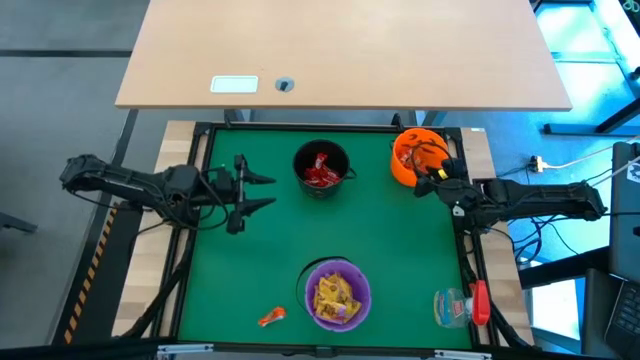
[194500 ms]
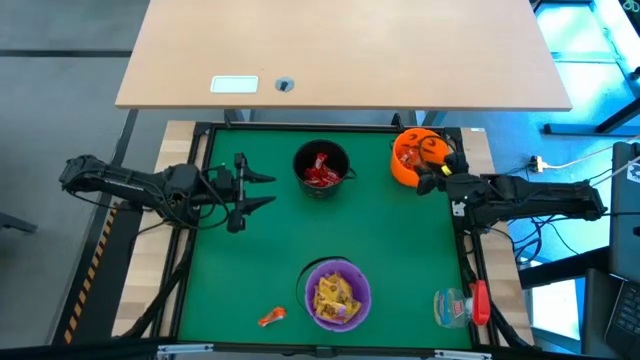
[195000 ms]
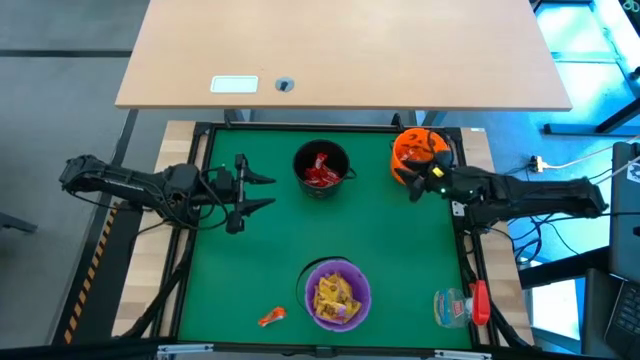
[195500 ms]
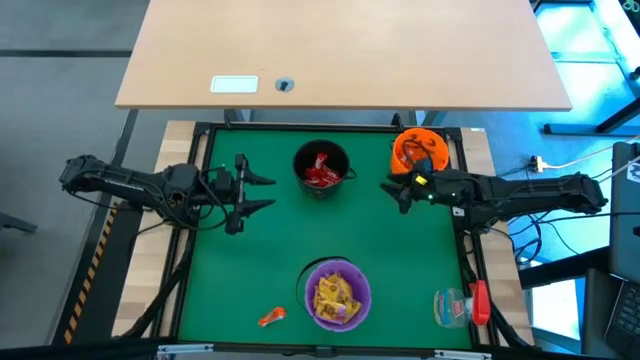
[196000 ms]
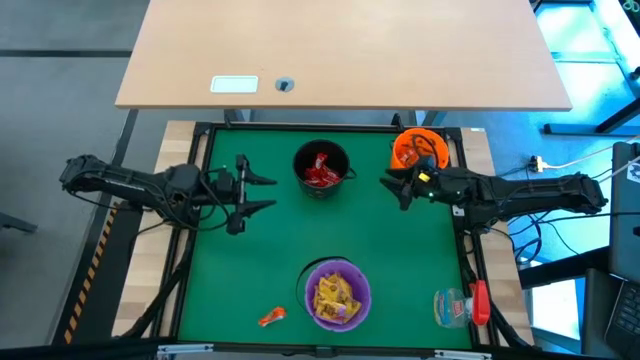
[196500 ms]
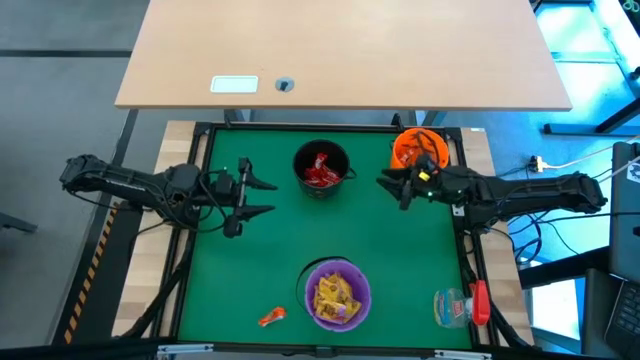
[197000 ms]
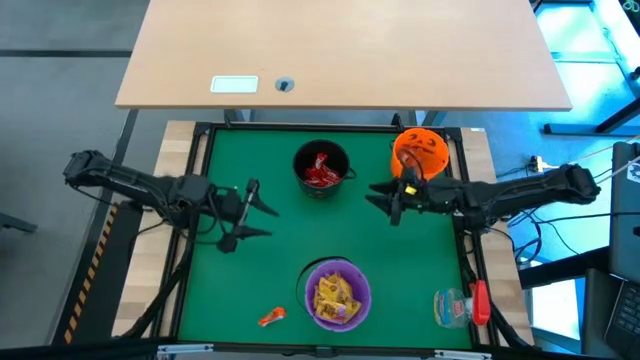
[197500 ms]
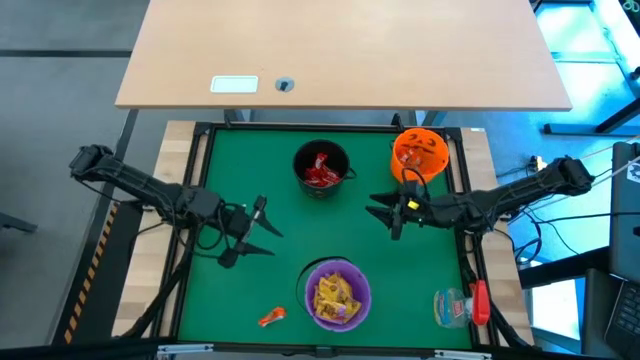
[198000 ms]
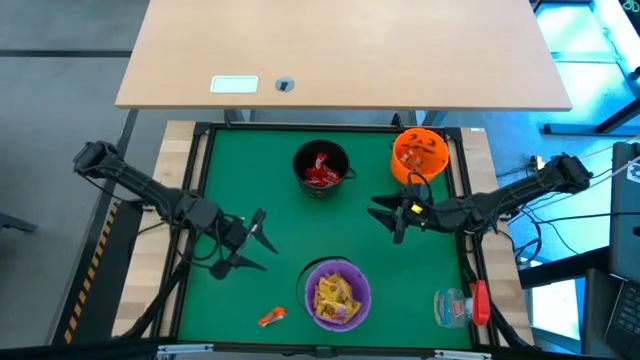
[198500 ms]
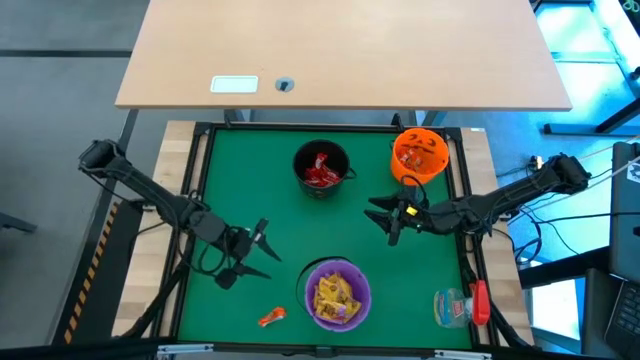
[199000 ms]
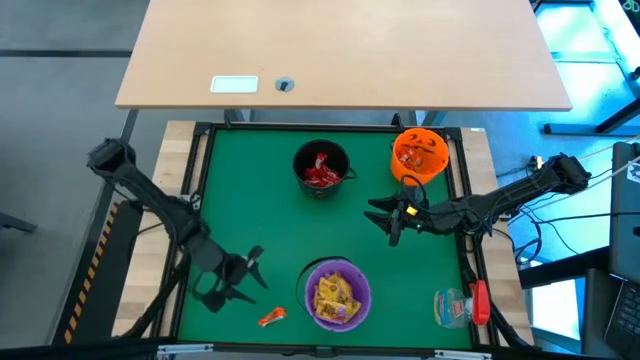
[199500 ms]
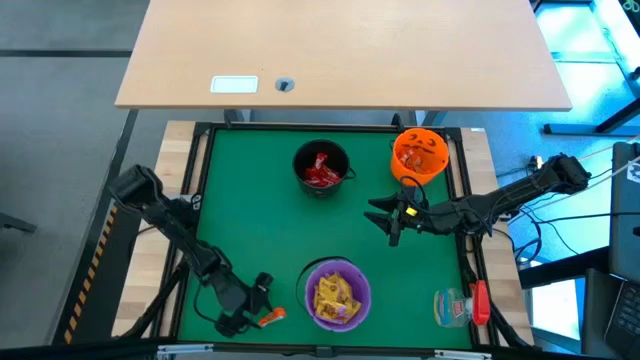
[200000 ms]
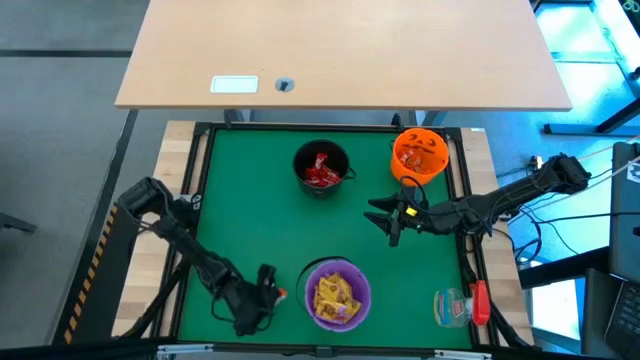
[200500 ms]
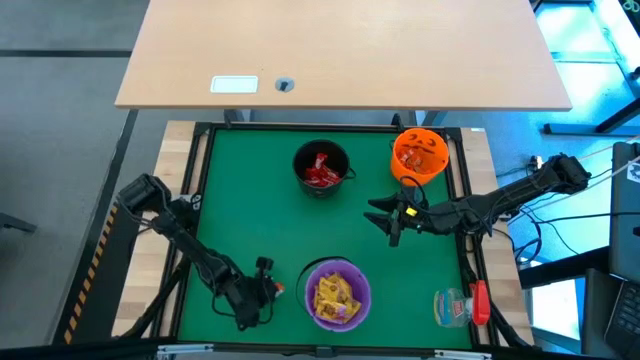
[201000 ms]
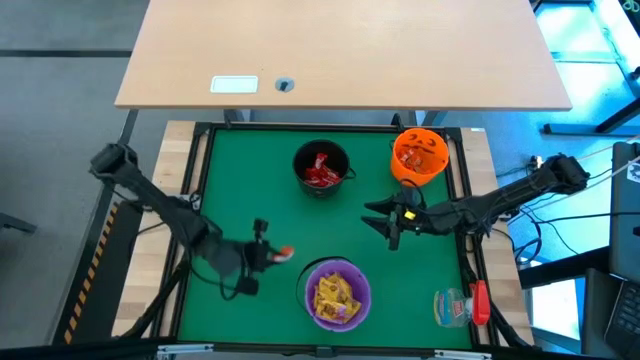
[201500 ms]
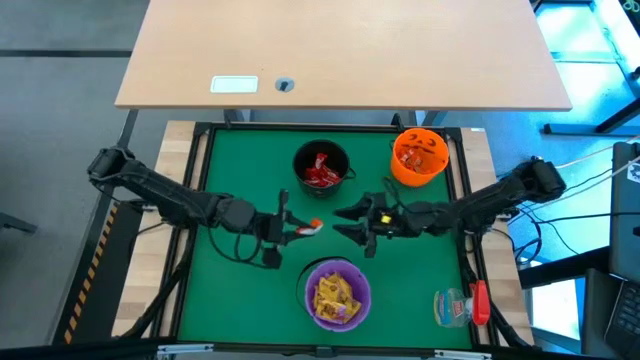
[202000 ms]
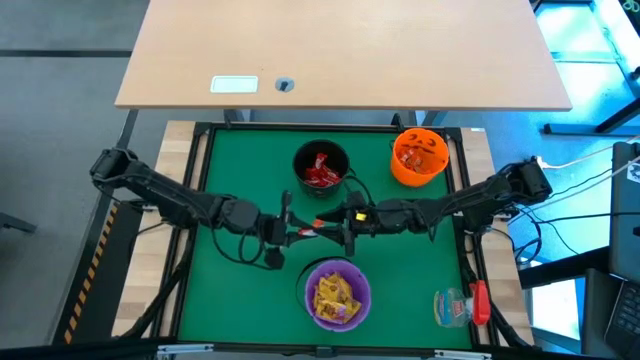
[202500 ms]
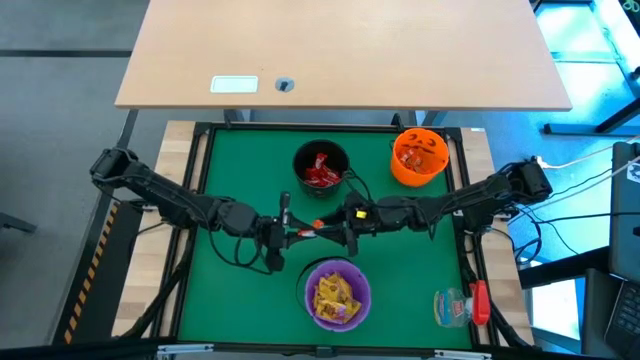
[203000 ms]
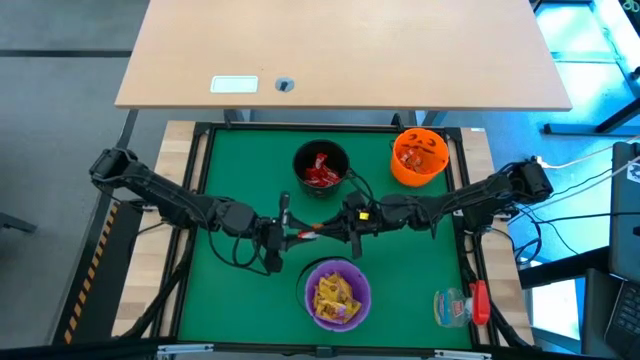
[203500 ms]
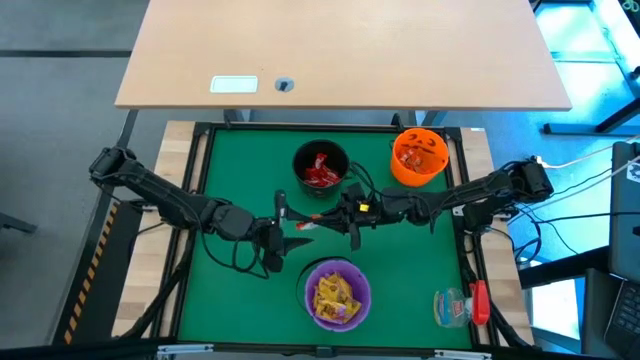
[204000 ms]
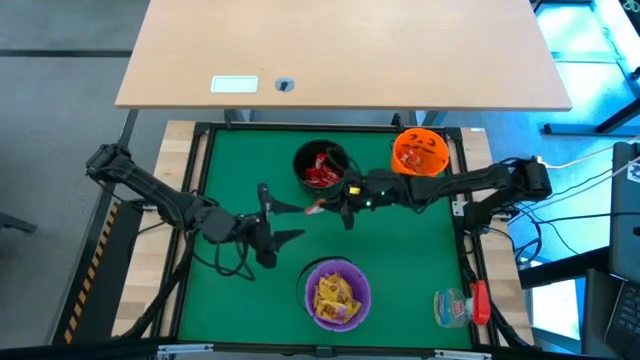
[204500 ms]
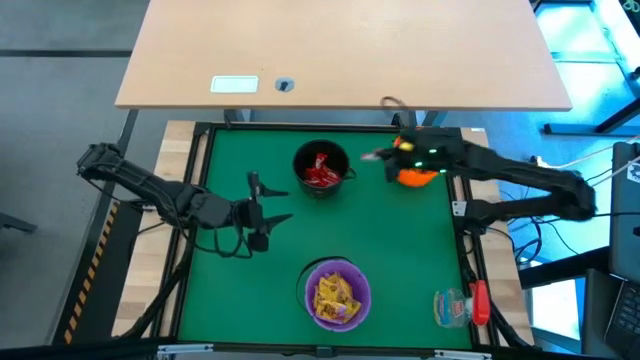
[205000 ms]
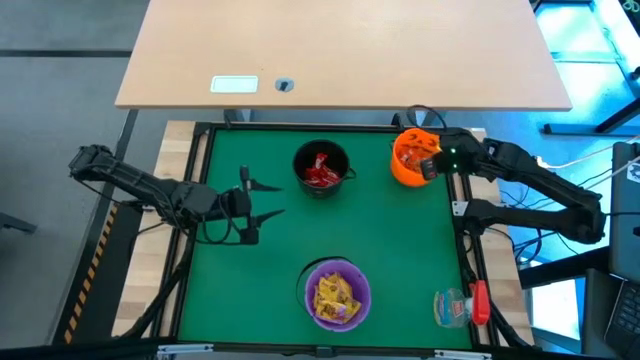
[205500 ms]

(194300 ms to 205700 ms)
Task: Sort candy
Put the orange candy into the orange bucket

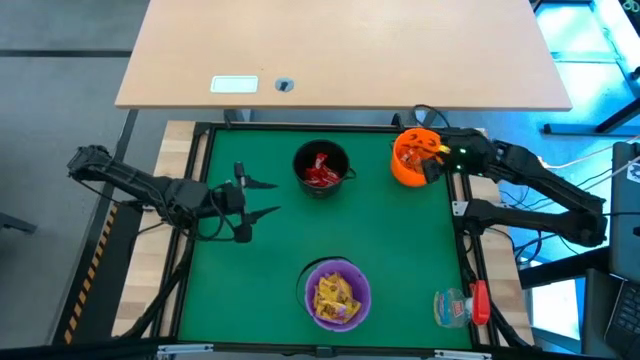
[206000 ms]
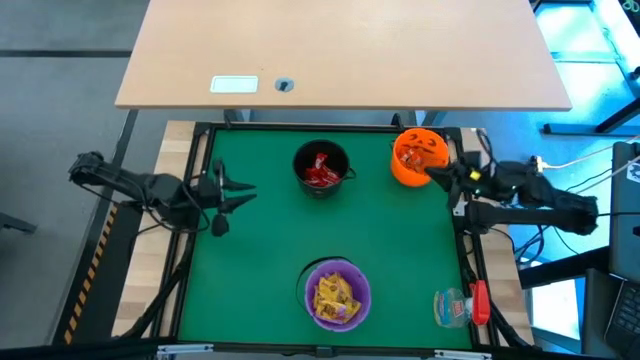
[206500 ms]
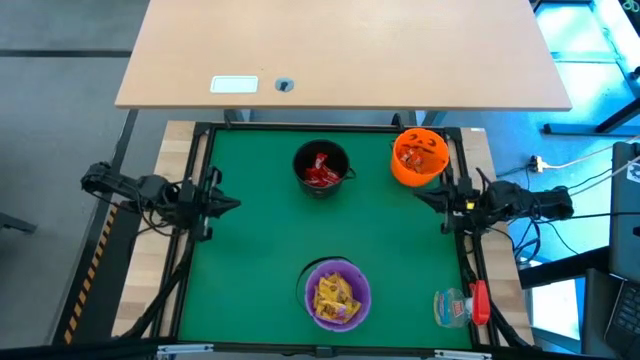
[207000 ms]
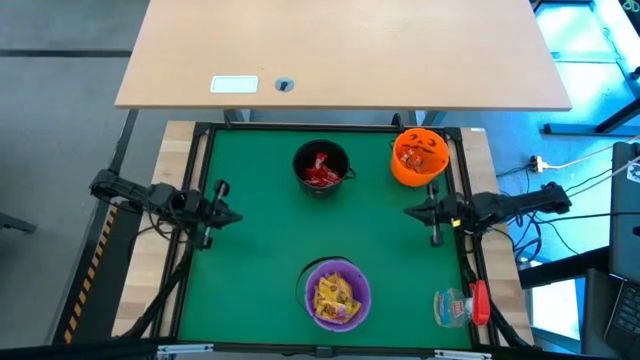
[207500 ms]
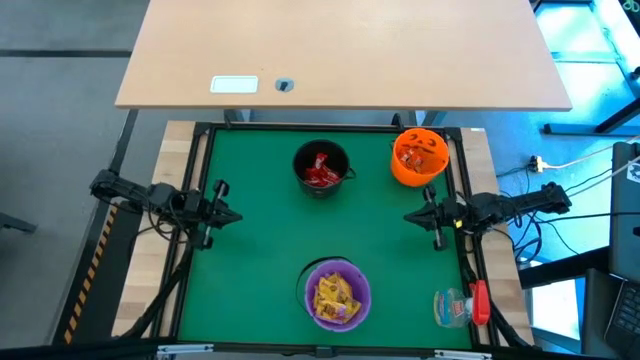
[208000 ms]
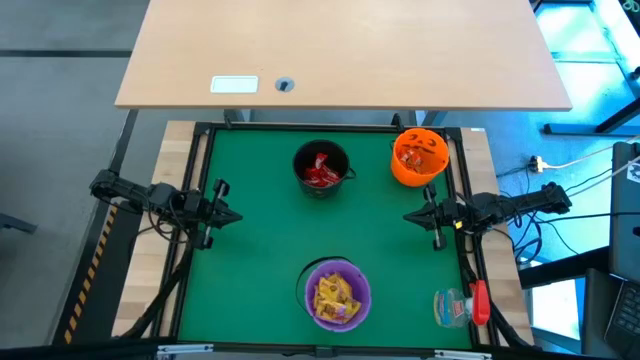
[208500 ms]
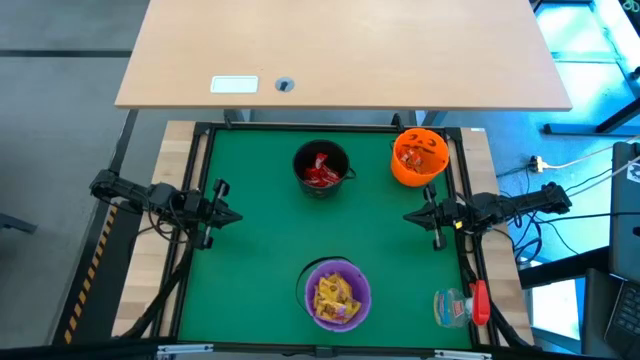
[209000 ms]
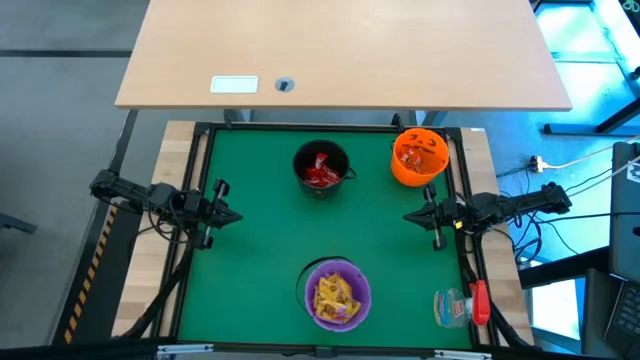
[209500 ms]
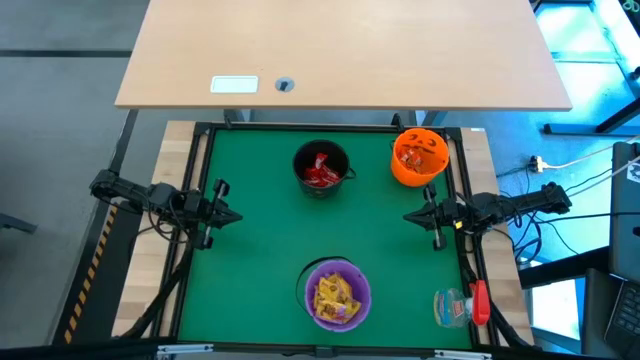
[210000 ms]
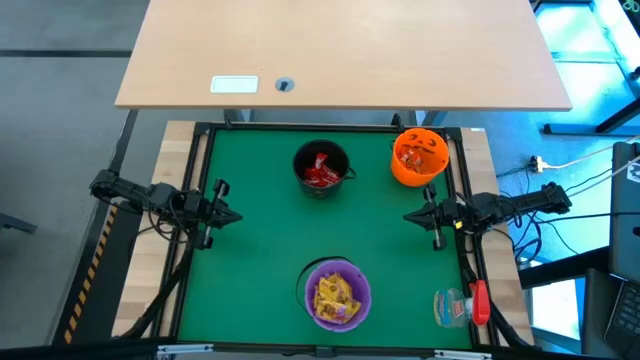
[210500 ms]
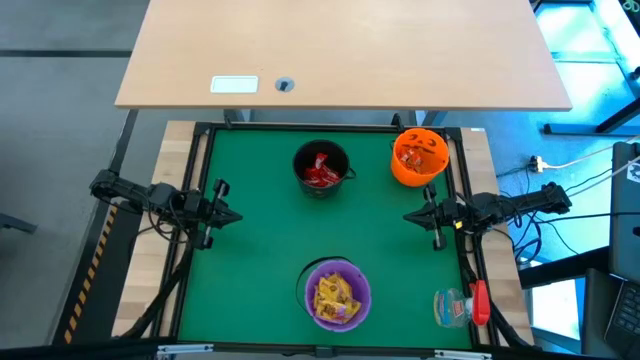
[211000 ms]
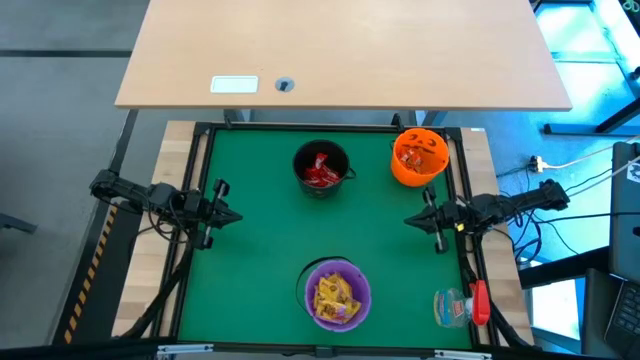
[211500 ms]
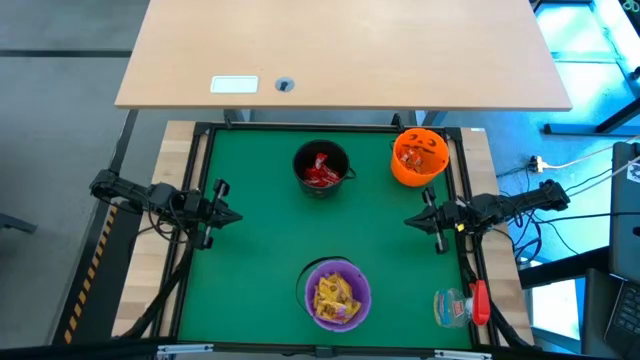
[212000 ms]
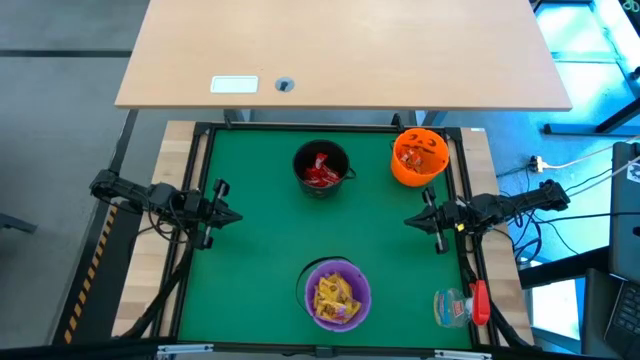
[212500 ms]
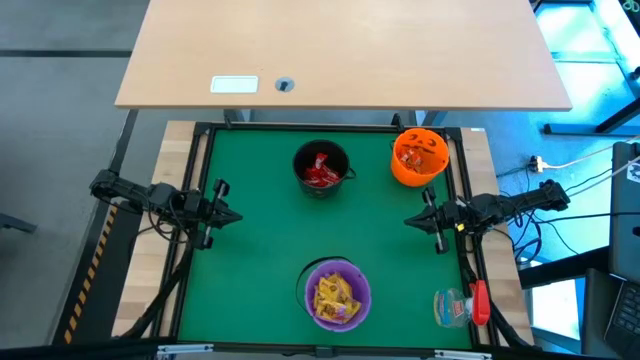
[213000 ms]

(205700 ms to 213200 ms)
Return to Home Position

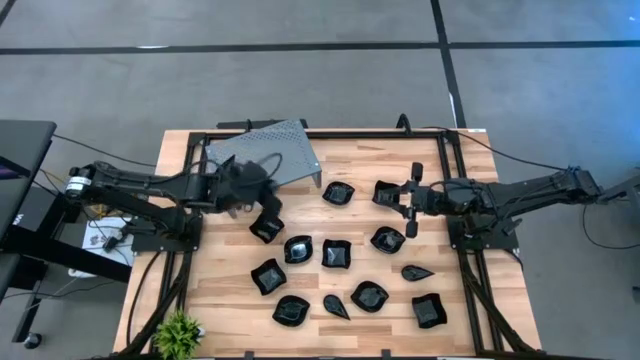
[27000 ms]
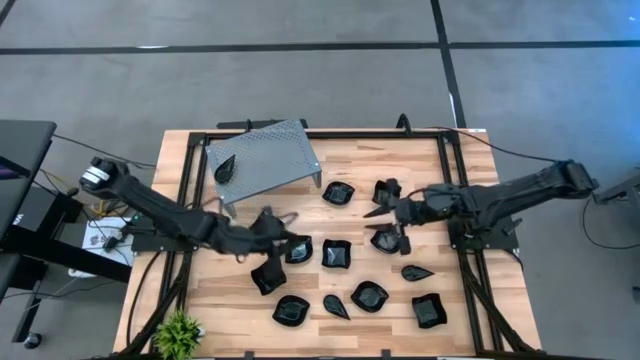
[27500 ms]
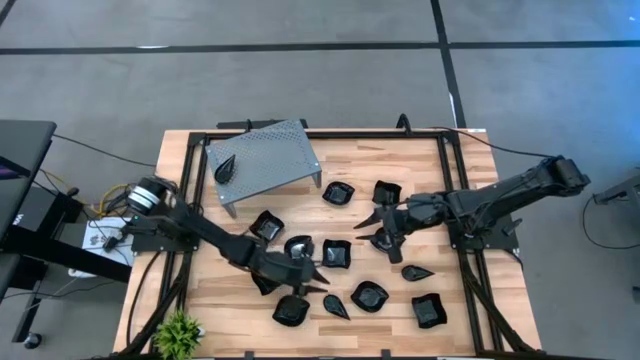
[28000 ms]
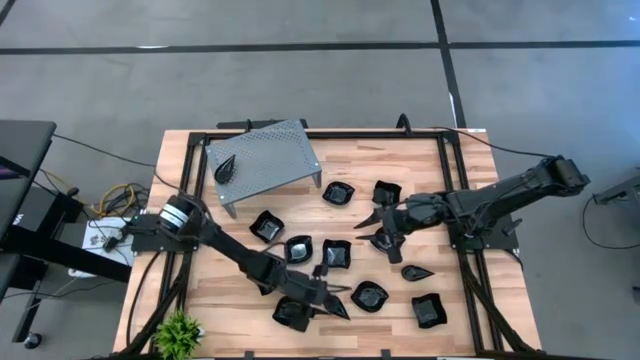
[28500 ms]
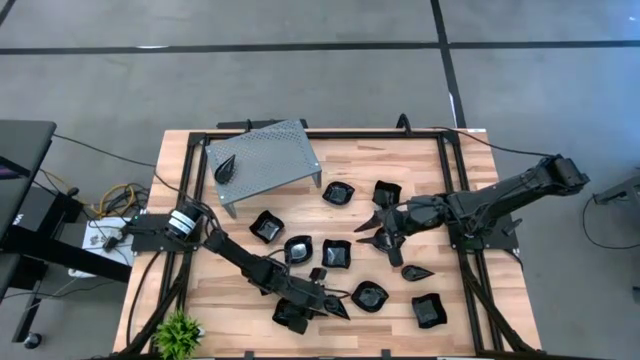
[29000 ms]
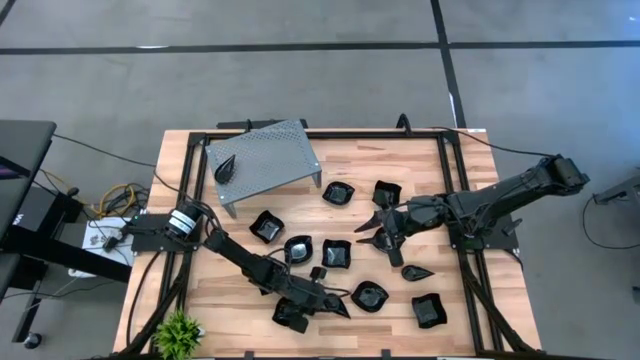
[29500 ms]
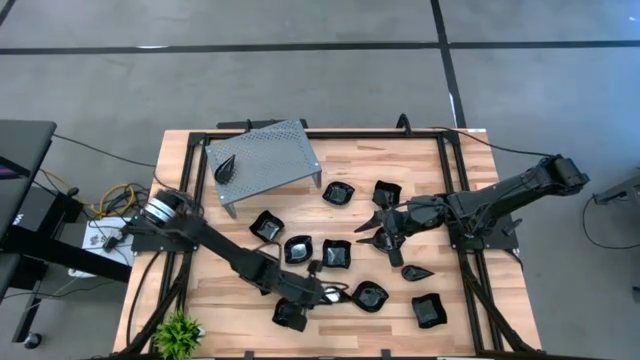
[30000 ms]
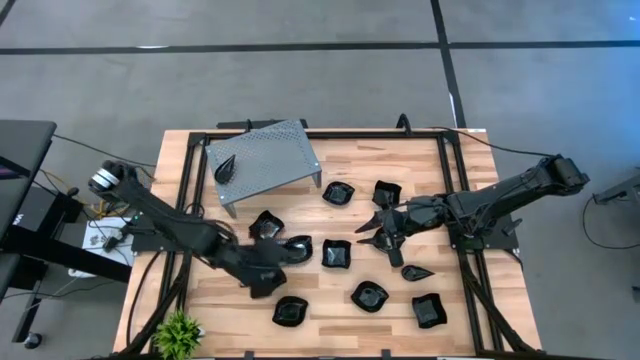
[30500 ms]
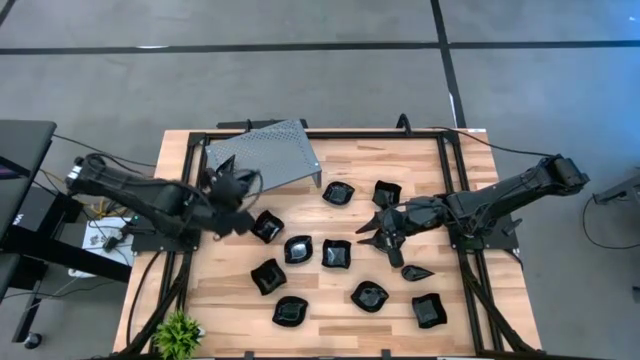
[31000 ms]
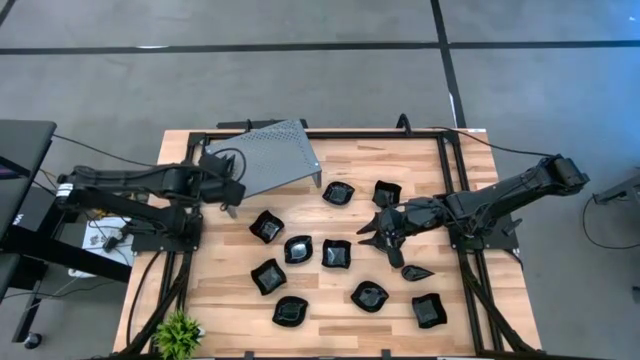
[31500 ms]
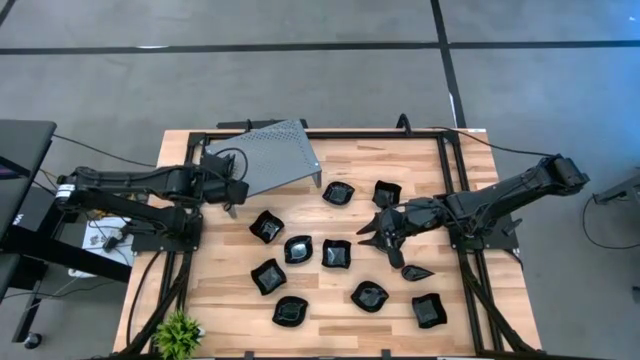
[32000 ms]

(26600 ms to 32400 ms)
Task: Pick & Place Mini shaped plates
Stack the black drop plate on top of the black drop plate on the shelf
